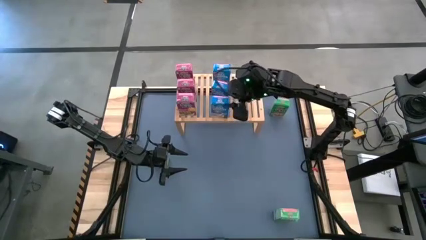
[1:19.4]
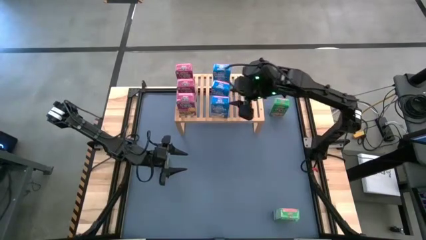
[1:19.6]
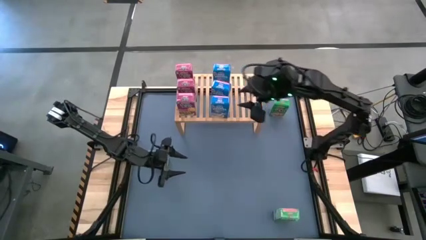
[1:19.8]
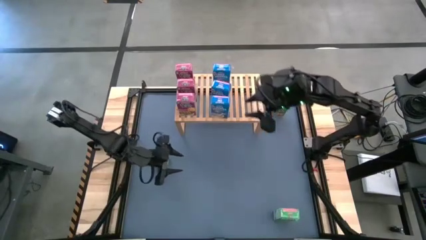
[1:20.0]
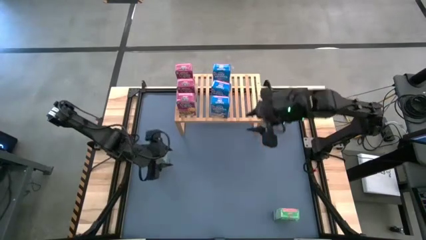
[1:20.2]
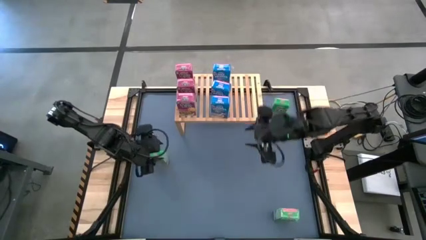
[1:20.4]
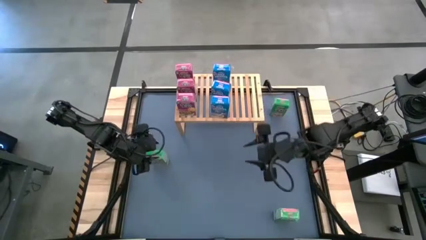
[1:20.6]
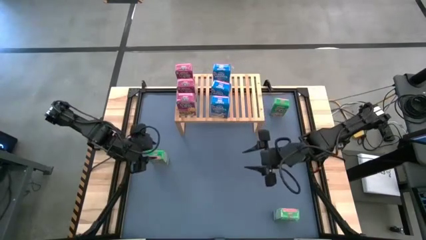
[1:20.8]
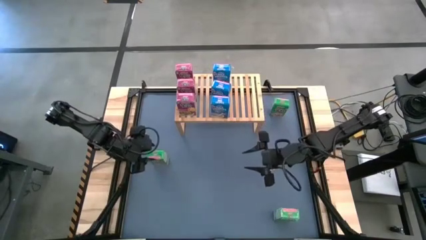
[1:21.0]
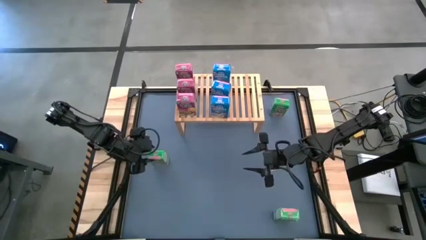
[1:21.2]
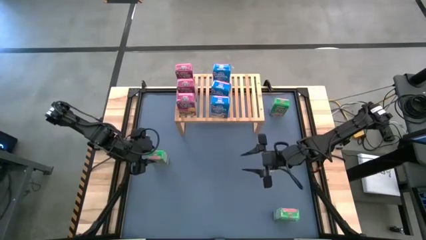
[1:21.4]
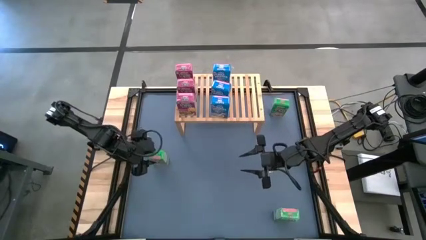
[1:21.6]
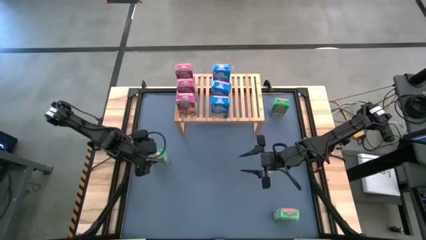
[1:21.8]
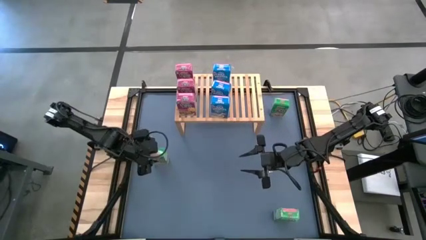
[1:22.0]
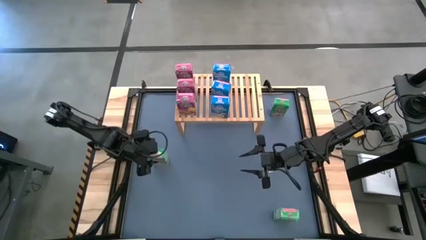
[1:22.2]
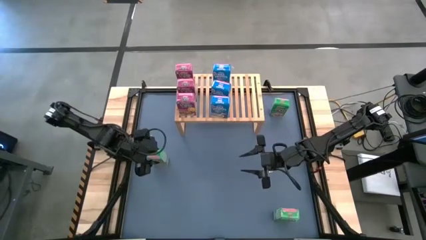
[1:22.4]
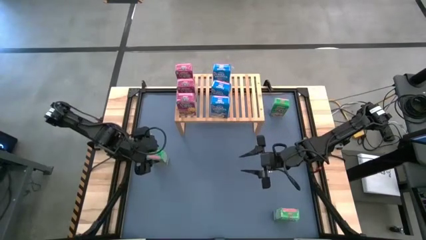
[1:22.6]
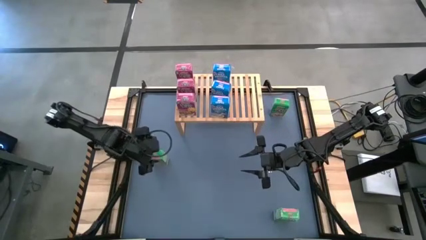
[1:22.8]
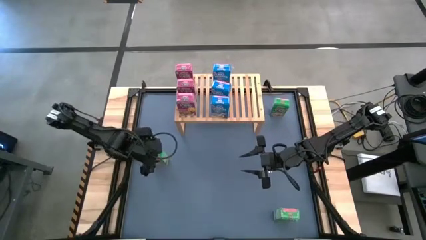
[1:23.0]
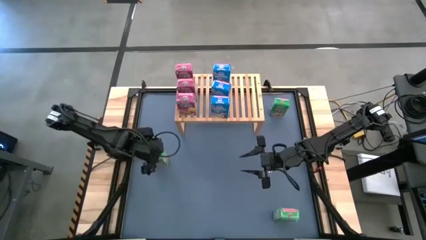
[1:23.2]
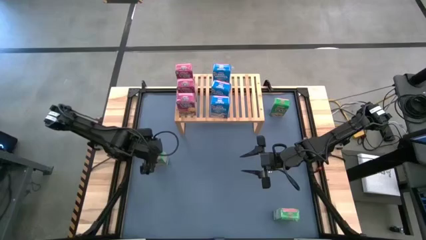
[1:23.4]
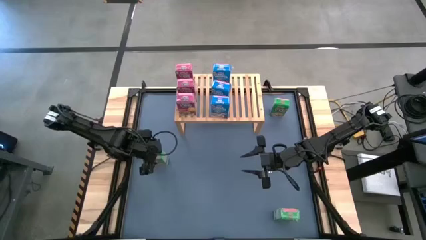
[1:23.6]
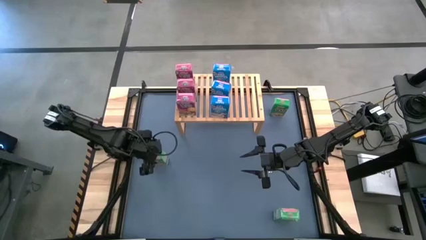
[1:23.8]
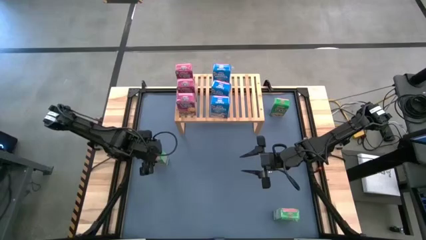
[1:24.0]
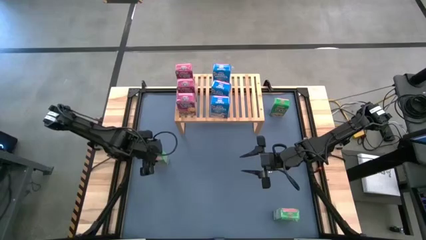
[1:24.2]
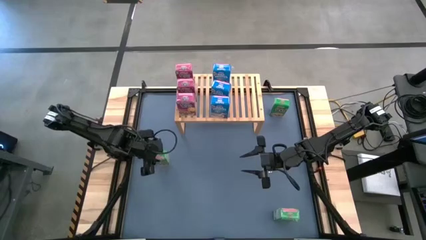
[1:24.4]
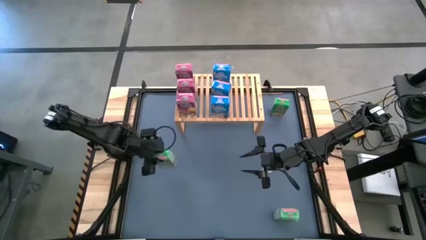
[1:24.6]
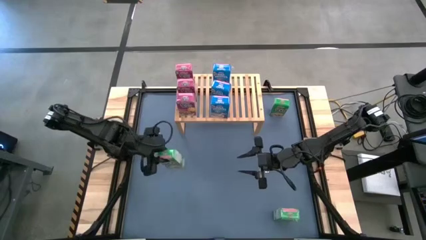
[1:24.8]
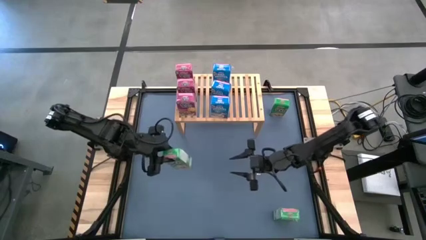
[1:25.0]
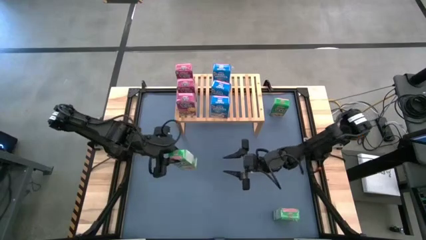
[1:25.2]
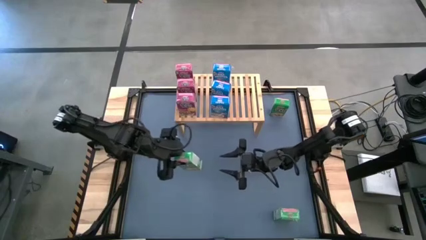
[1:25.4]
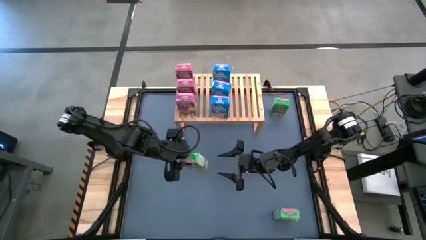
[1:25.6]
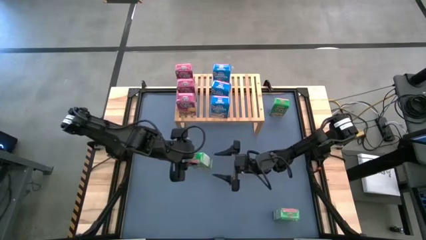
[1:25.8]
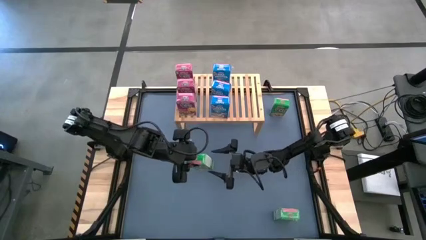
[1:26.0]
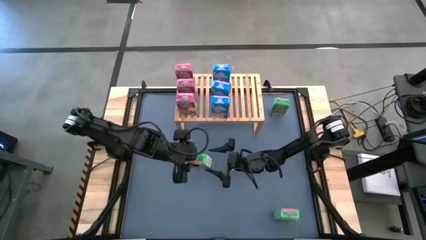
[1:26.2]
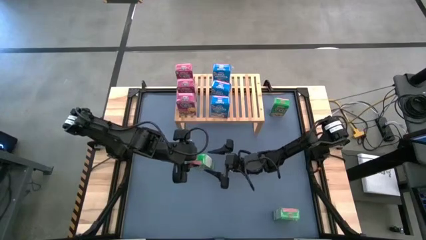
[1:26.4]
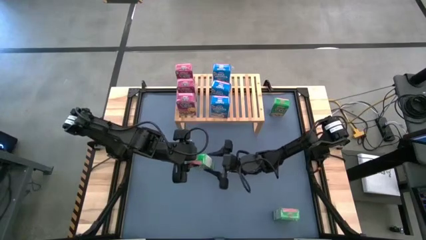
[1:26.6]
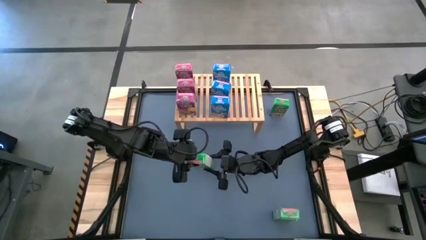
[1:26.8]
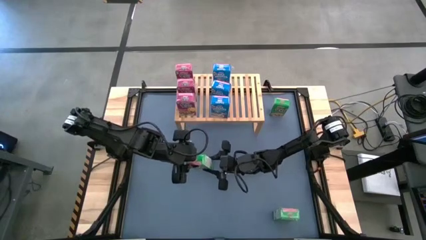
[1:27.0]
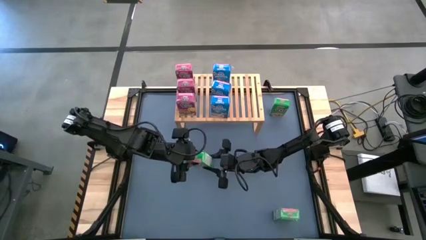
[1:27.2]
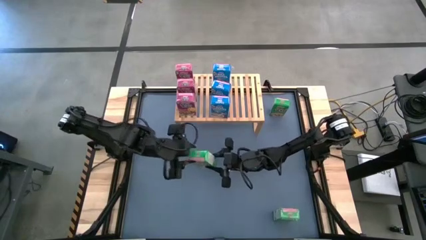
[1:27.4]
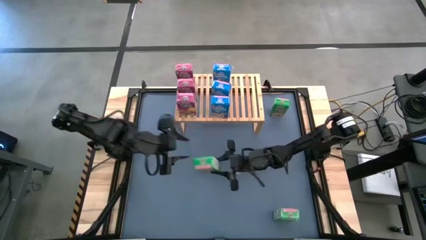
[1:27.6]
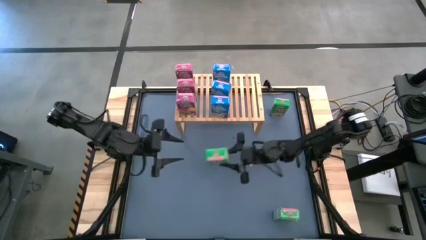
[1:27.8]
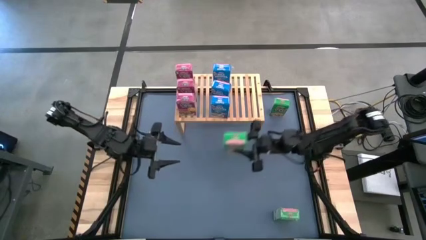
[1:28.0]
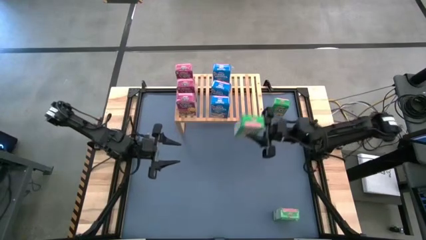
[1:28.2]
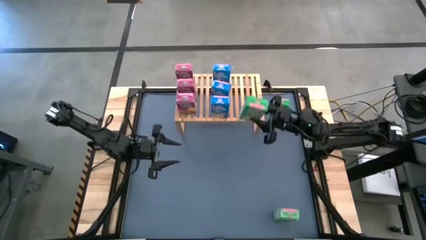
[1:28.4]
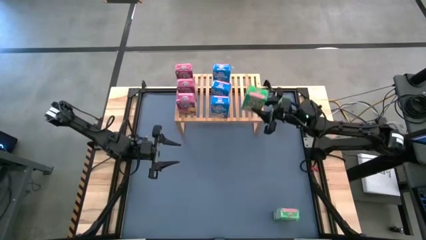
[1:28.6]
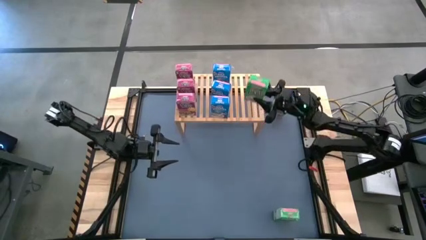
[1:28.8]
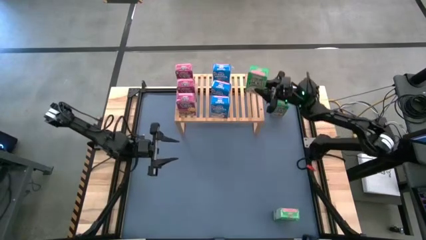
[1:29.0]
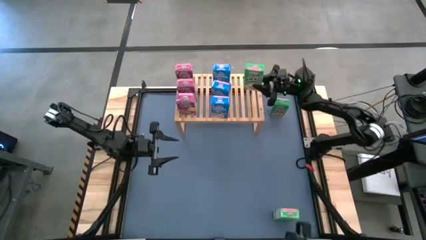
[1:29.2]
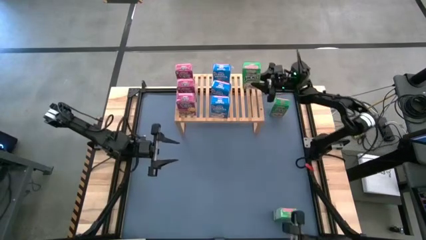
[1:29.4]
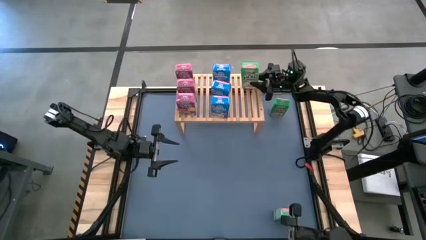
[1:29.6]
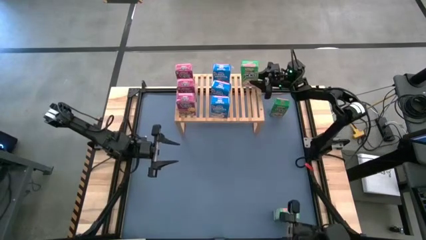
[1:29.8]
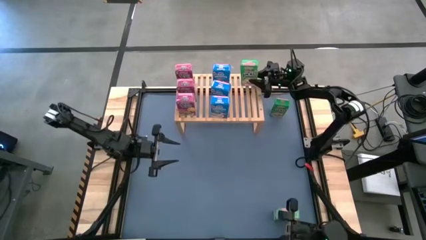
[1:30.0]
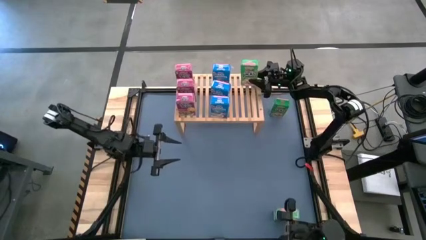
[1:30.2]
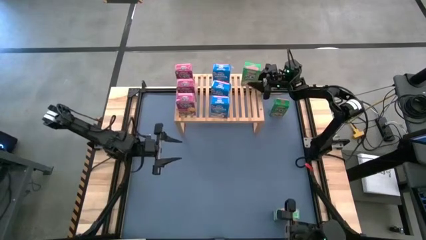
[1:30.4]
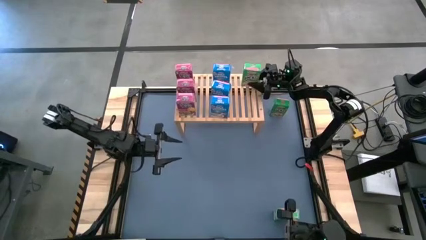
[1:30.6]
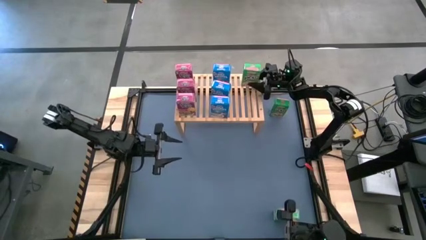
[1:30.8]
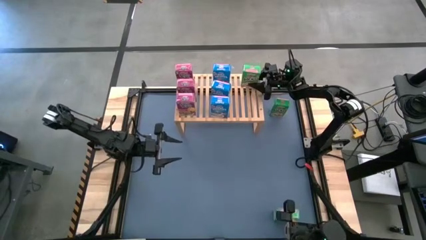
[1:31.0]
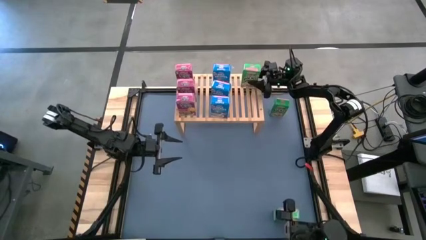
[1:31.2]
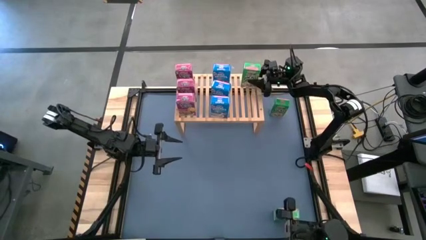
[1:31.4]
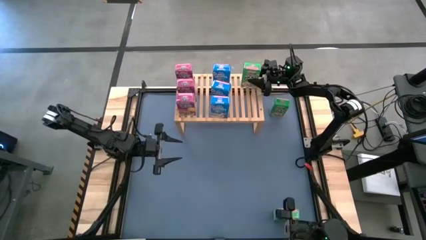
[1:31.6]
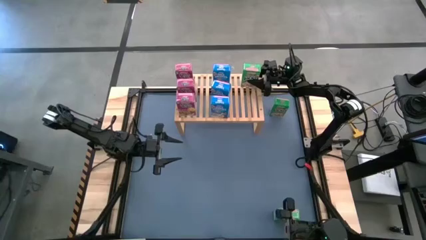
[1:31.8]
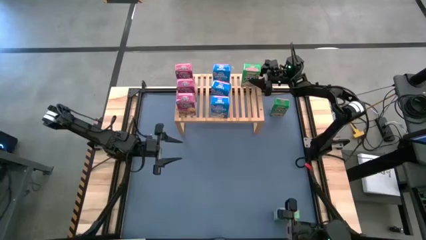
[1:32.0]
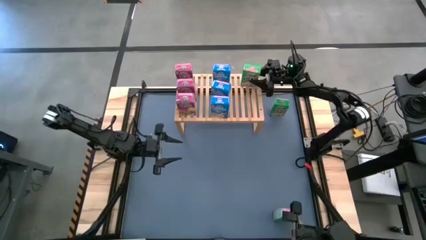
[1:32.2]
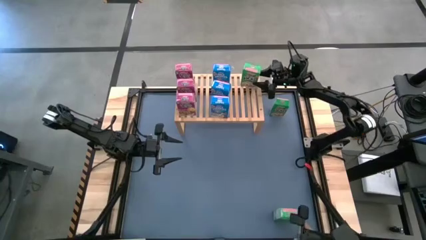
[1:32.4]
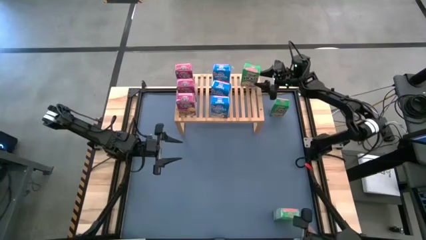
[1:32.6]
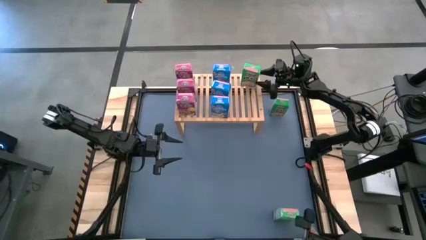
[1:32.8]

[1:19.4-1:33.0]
Task: Stack cereal on shelf
Put the middle left green cereal box on the shelf

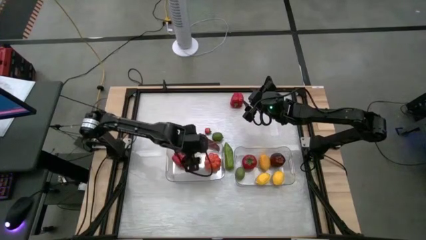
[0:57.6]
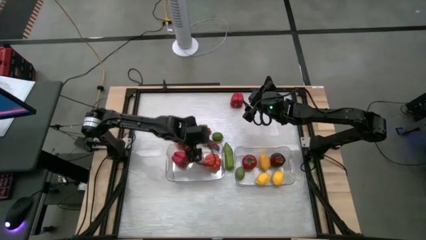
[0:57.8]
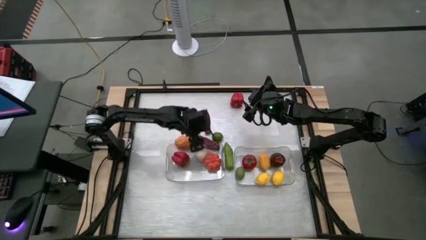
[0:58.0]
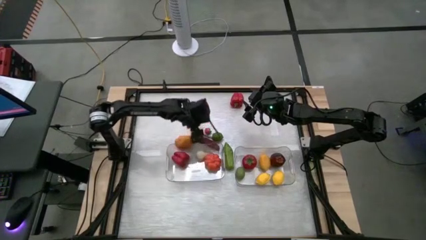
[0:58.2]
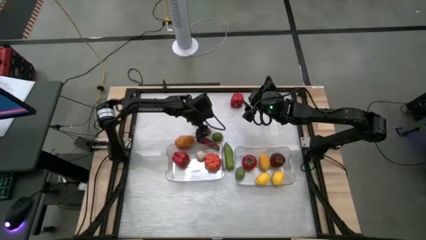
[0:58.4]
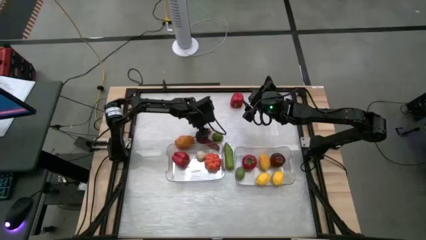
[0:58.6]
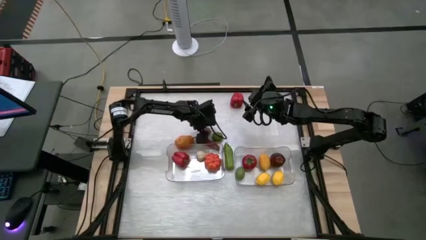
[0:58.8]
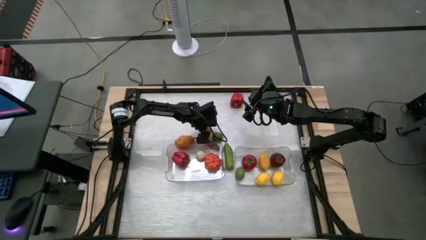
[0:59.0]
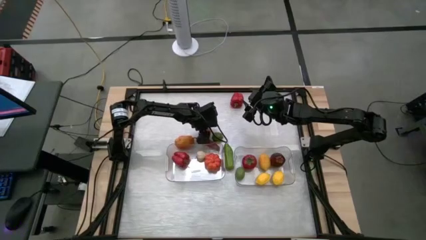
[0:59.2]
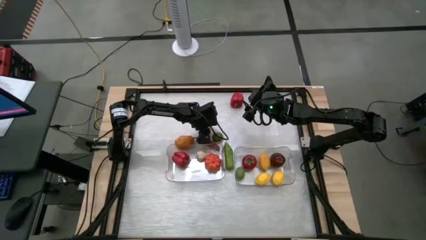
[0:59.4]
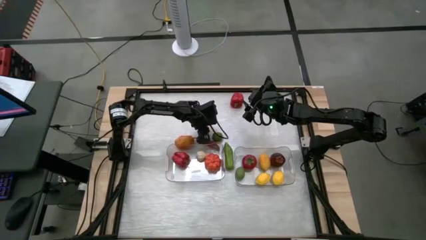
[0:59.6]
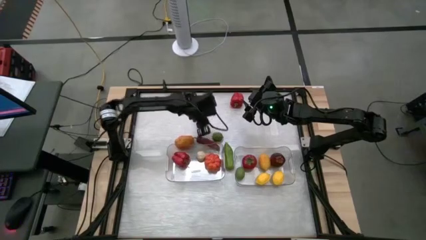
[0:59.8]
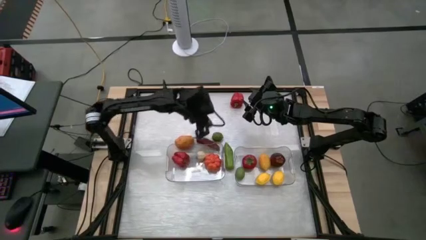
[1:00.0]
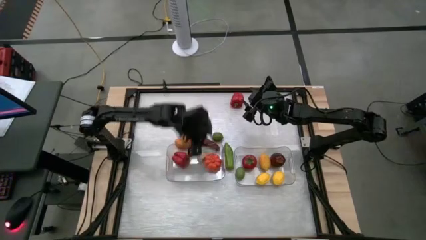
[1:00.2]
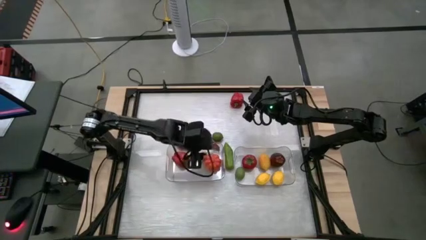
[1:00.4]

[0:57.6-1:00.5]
Task: Sort produce into baskets
Put the orange tomato into the left transparent bin
